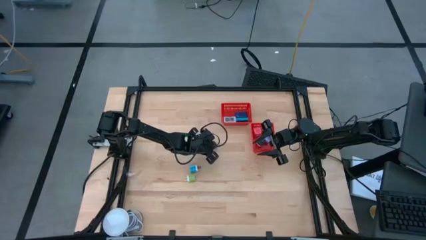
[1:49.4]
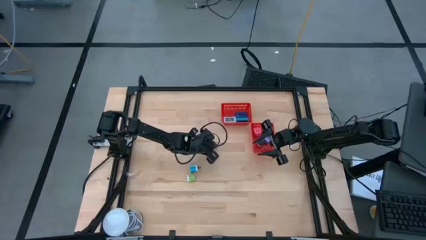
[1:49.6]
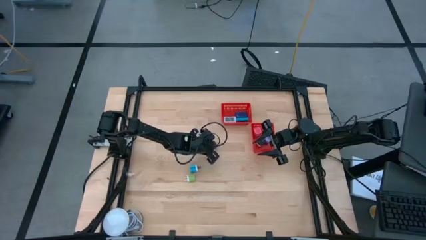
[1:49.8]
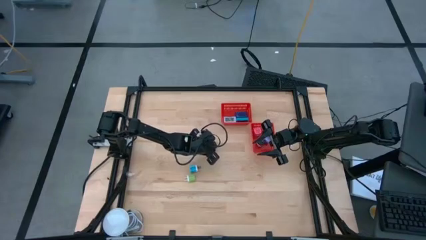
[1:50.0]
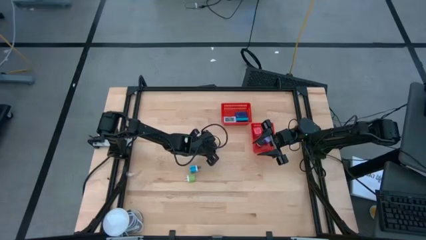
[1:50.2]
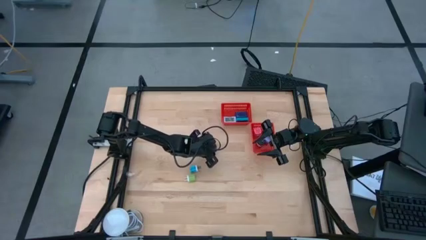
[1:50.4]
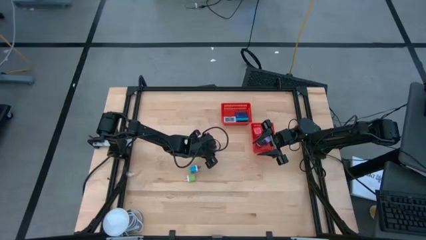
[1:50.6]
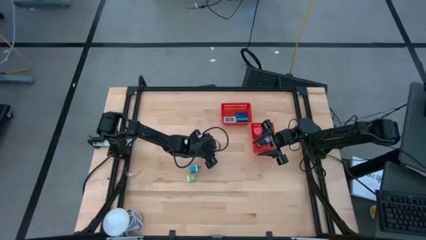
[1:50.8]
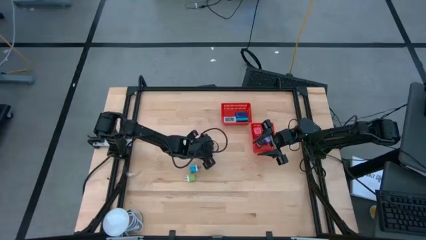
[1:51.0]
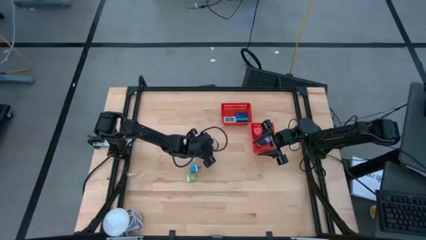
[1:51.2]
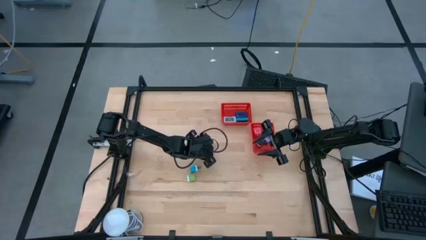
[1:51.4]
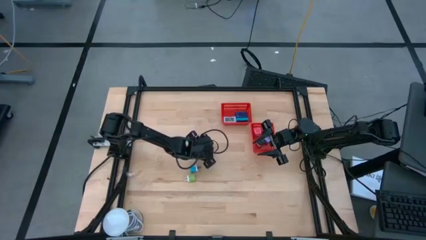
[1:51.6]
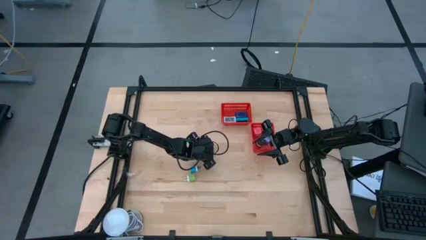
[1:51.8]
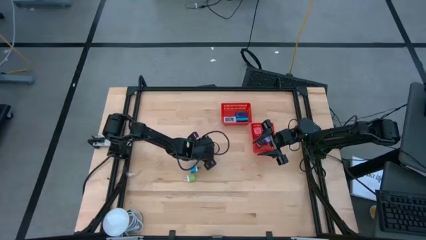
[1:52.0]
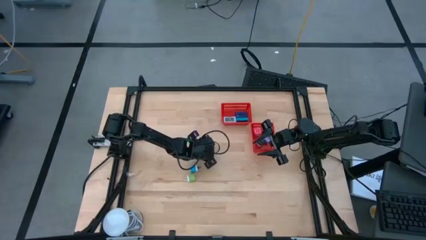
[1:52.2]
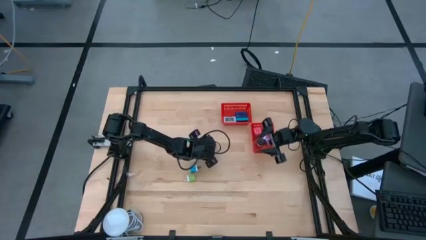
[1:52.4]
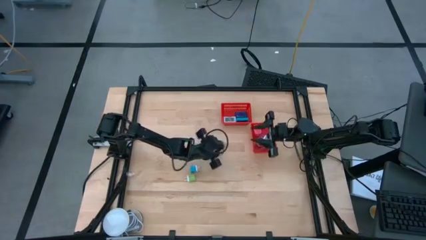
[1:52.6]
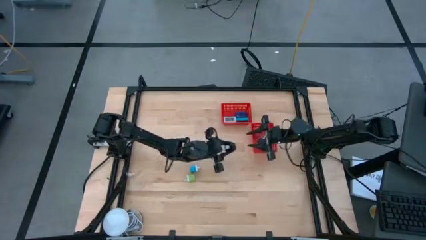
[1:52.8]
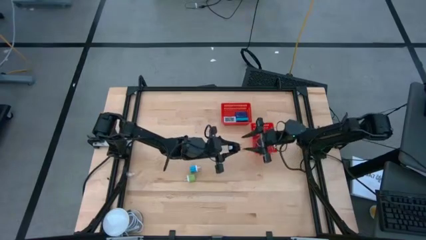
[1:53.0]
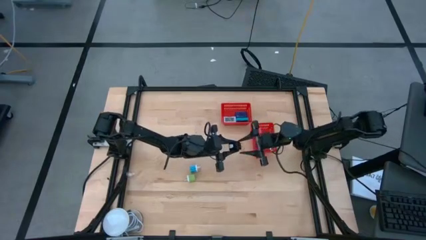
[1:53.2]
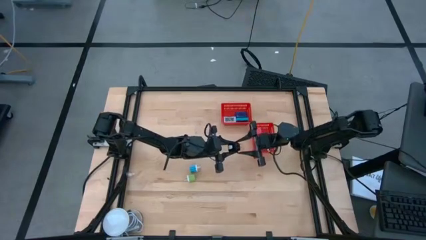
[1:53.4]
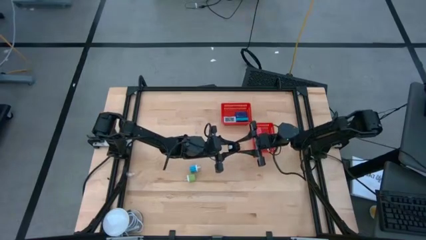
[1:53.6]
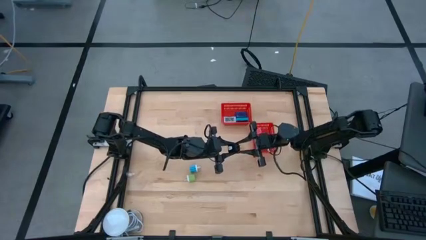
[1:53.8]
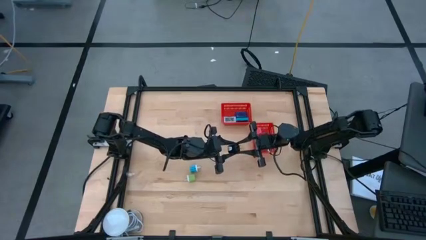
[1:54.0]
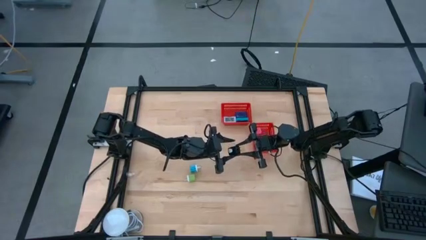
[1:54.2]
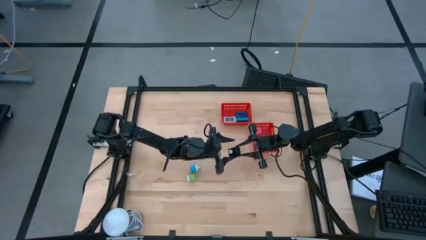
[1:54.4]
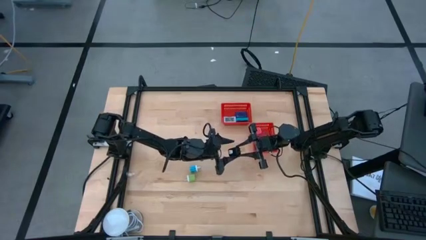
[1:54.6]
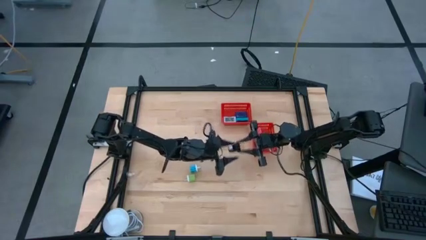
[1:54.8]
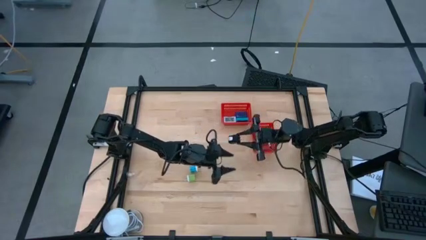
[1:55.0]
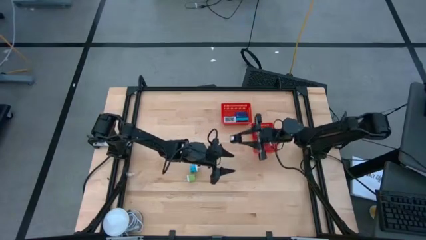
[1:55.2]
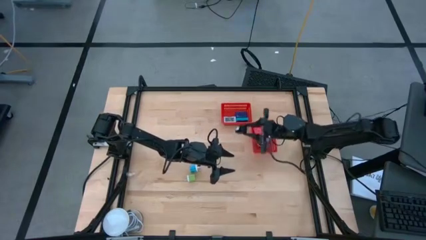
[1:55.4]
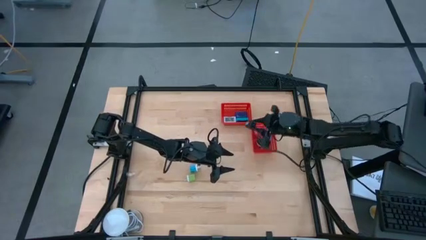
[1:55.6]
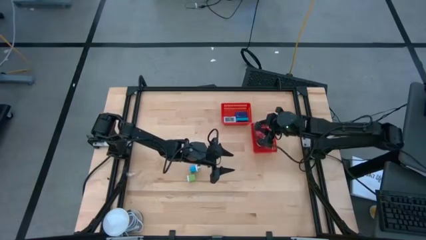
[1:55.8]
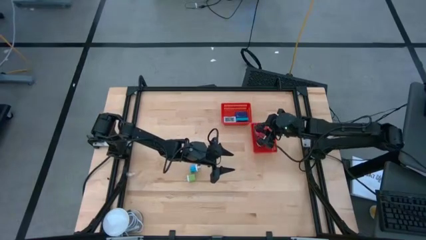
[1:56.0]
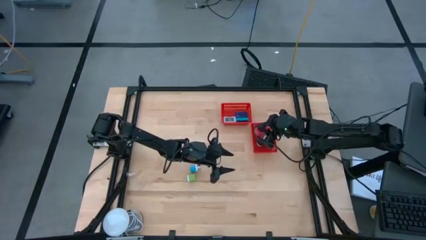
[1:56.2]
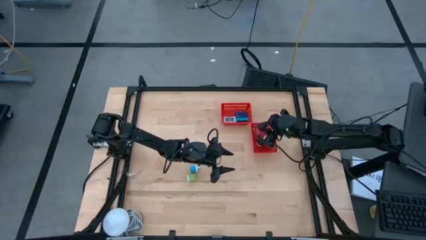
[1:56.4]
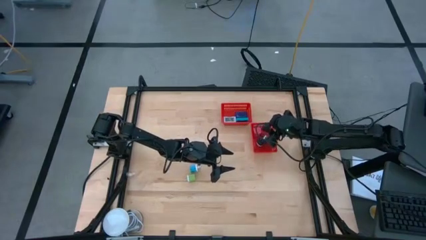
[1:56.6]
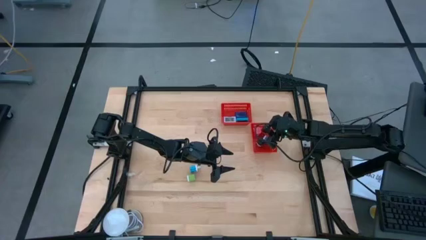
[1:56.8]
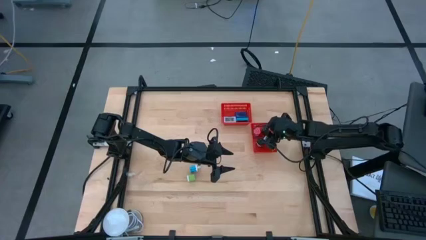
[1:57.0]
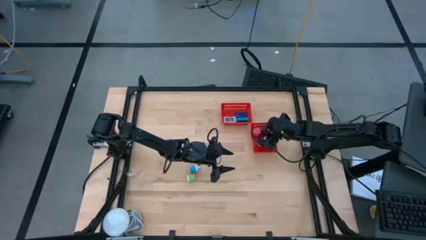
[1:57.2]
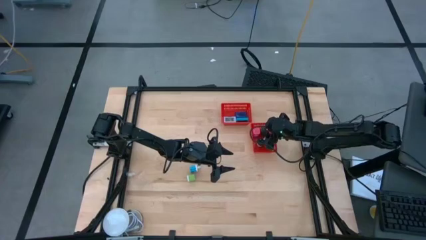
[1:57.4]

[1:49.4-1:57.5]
Task: Pick & Place Office items
Put the black charger adapter into the bottom red bin

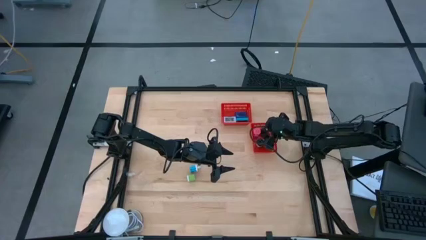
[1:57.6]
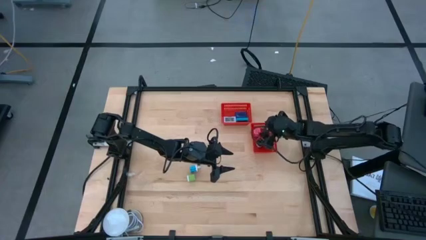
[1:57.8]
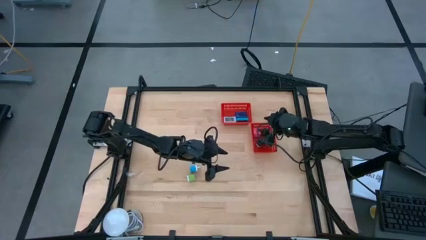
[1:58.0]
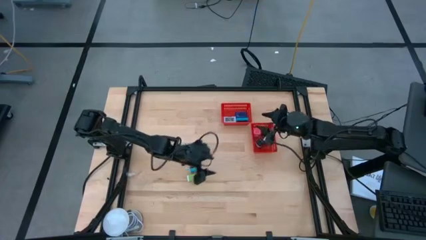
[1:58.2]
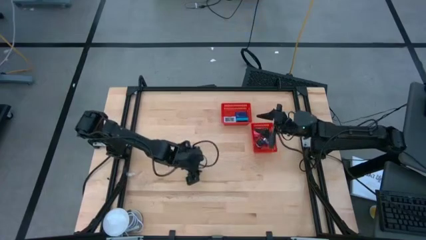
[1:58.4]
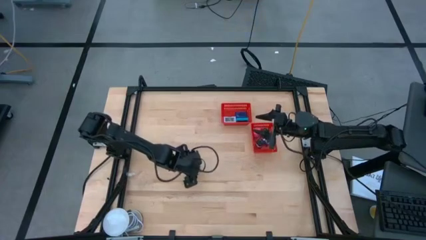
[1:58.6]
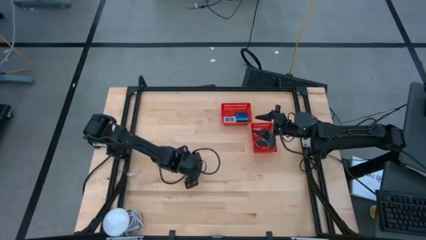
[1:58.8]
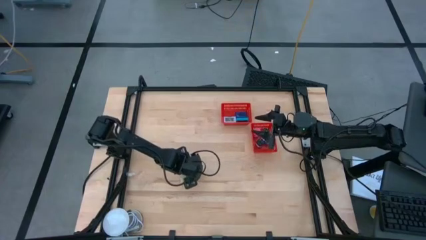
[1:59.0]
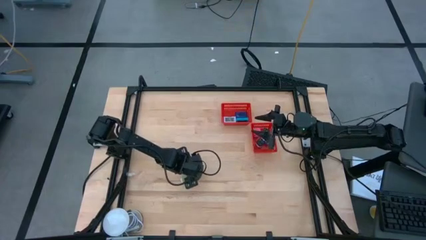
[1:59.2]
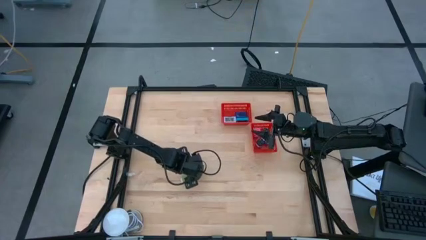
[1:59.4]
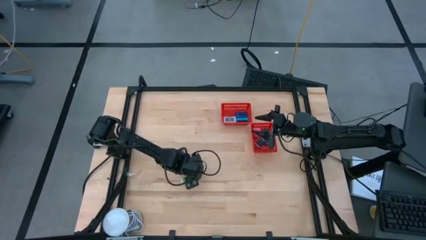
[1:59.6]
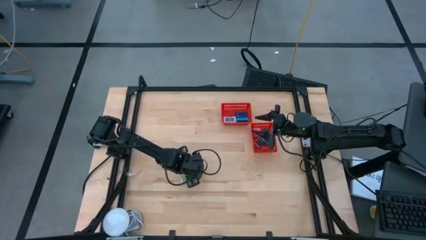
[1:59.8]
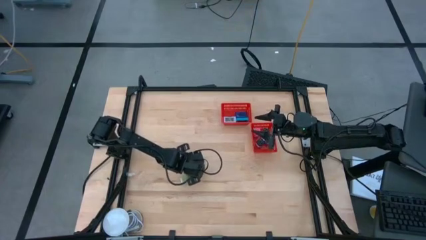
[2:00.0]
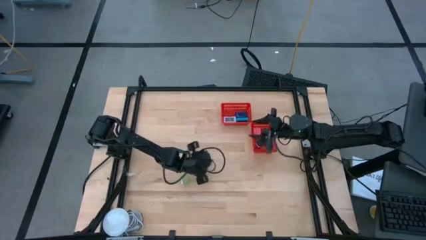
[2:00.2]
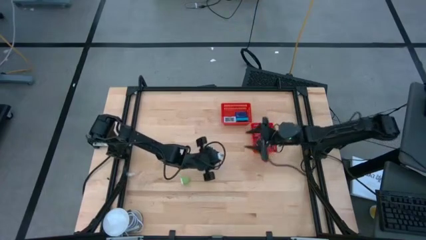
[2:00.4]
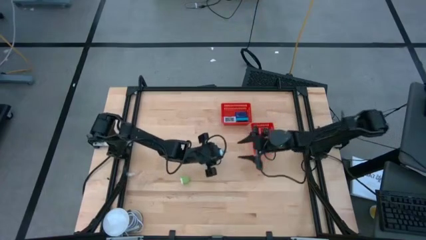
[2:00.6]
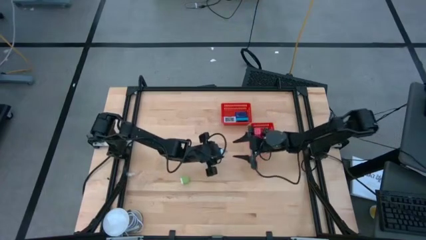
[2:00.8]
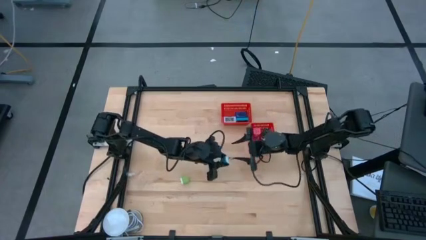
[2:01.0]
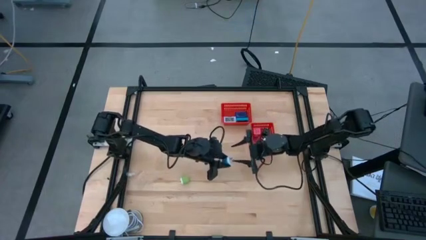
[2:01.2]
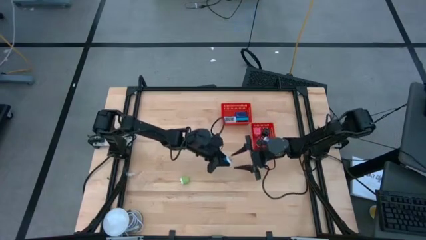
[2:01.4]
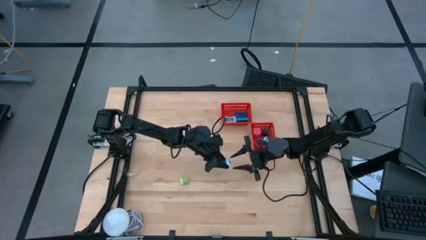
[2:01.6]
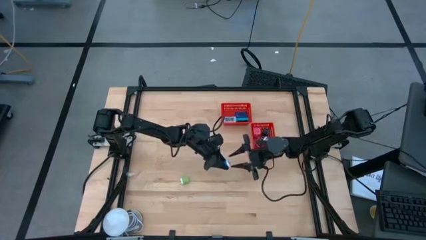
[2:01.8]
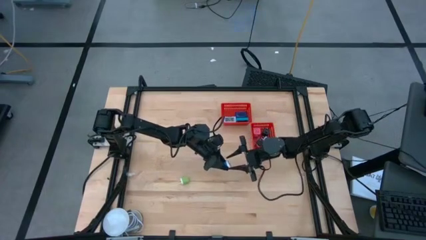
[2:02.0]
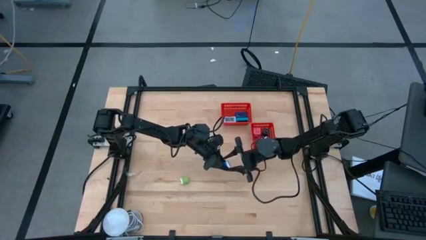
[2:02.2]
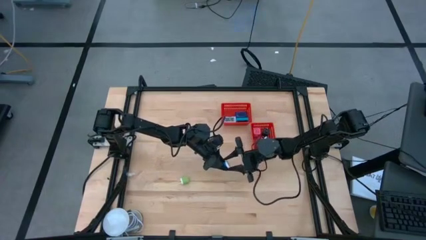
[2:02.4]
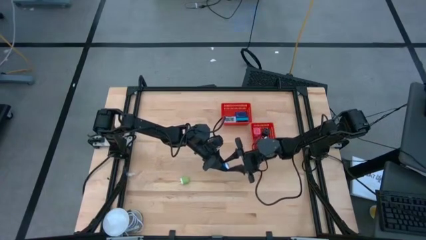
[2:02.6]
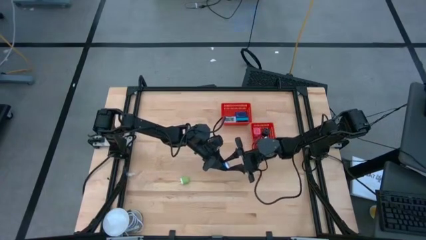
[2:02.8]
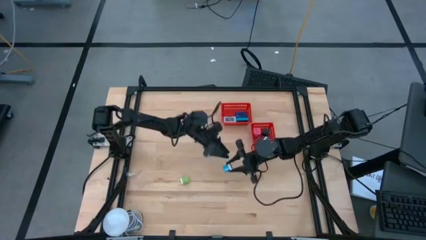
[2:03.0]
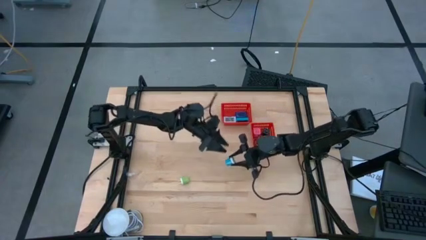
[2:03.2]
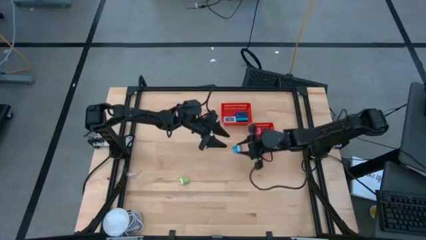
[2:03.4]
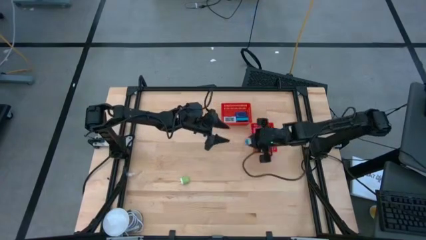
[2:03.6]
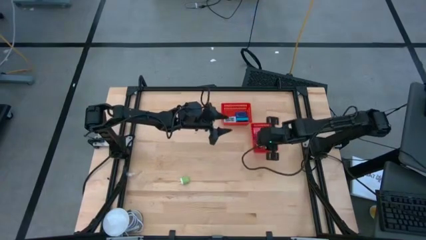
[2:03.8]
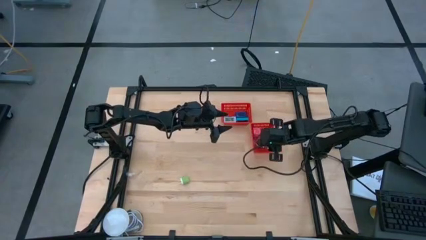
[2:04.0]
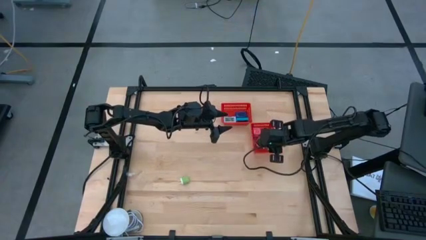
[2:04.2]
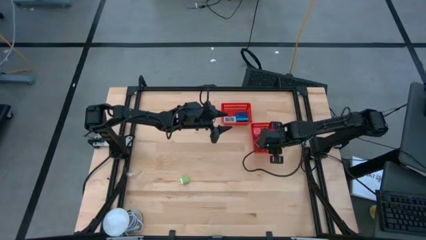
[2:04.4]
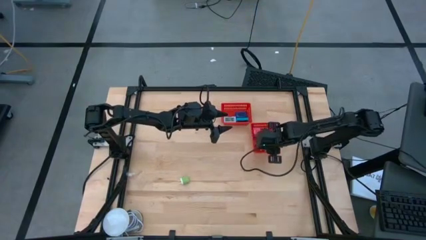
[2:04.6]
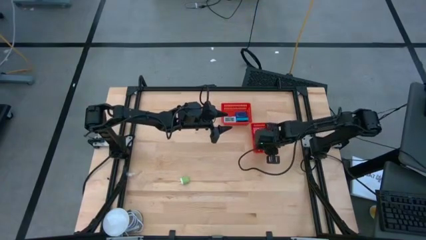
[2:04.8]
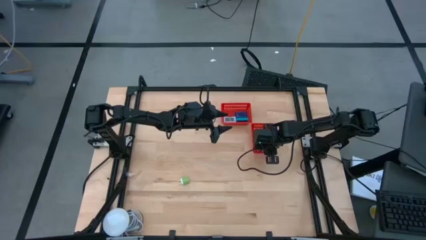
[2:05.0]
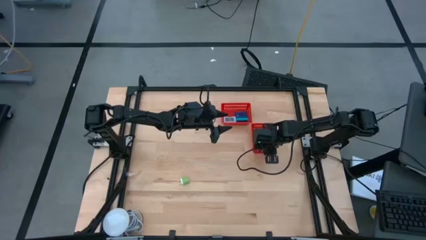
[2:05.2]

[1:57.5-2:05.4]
Put the blue charger adapter into the bottom red bin
